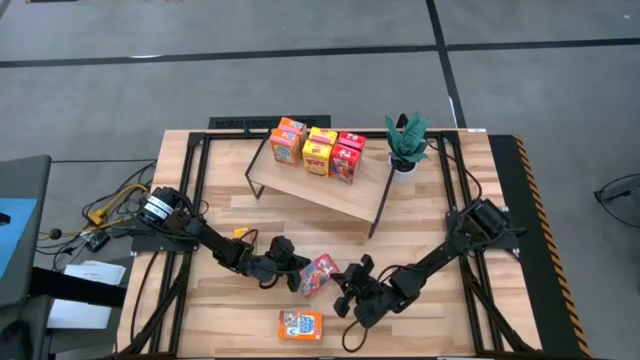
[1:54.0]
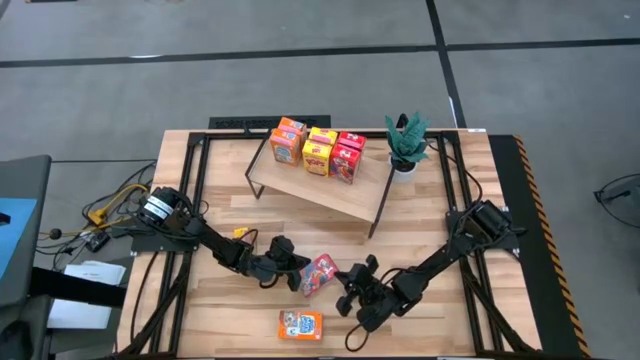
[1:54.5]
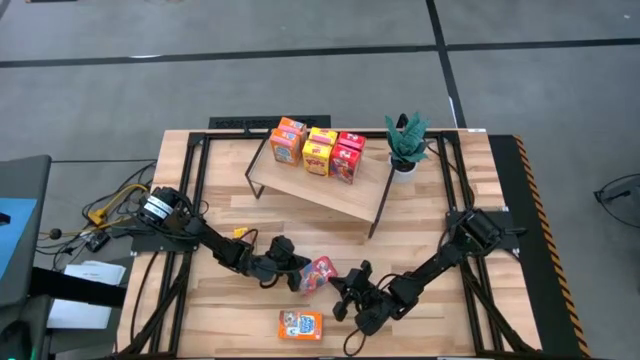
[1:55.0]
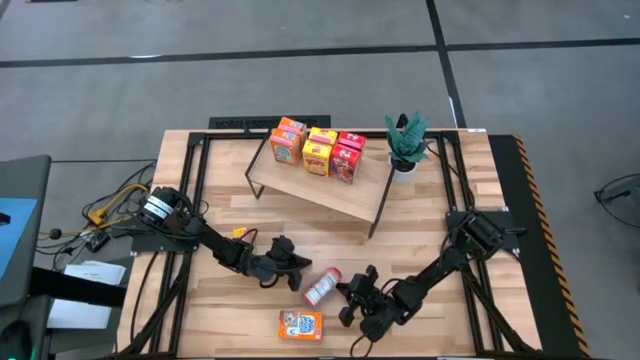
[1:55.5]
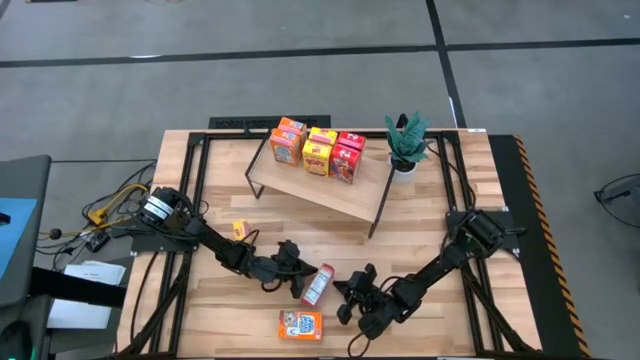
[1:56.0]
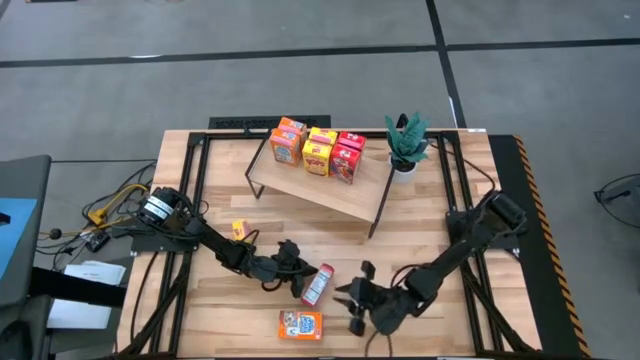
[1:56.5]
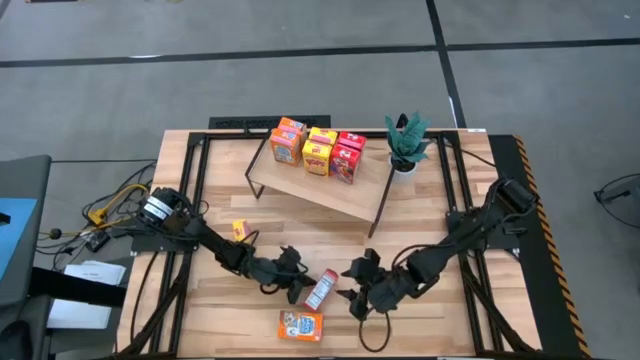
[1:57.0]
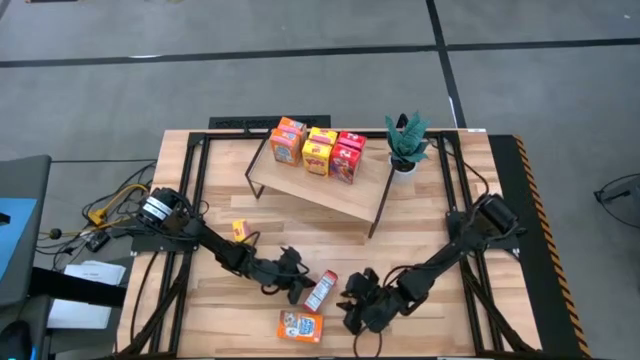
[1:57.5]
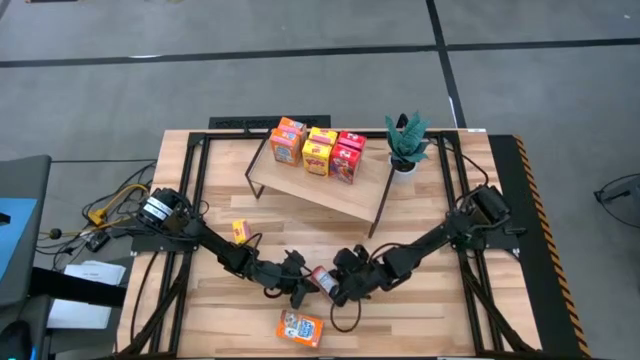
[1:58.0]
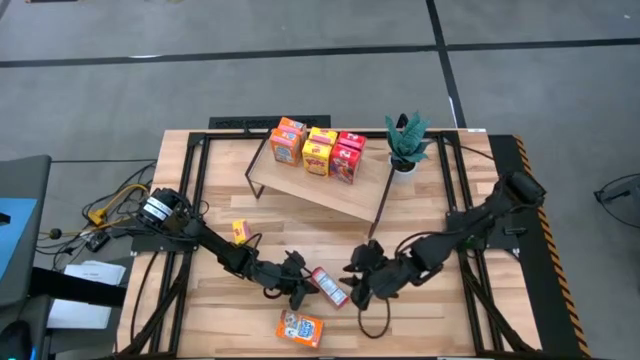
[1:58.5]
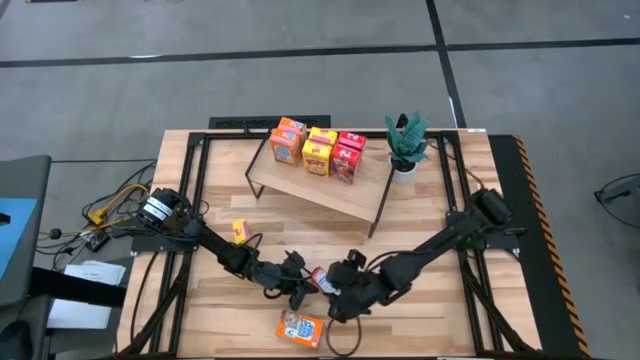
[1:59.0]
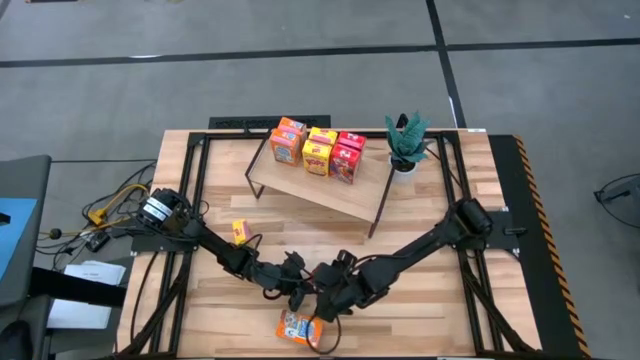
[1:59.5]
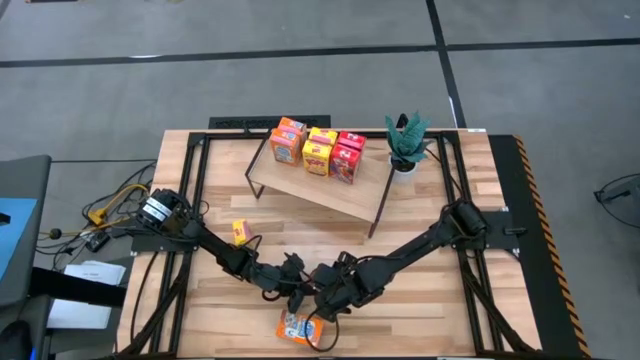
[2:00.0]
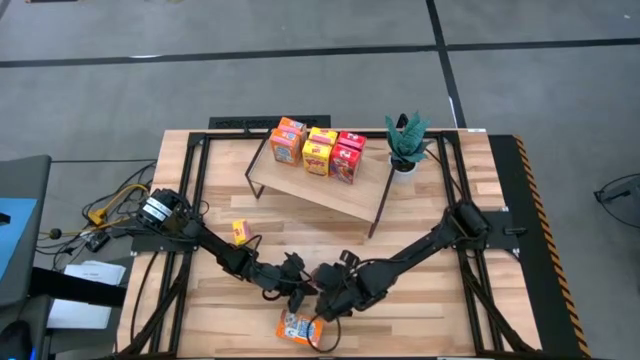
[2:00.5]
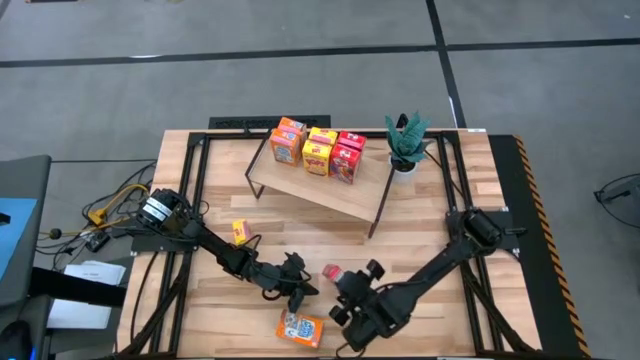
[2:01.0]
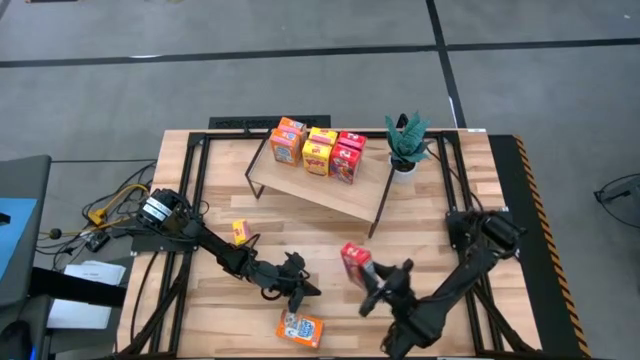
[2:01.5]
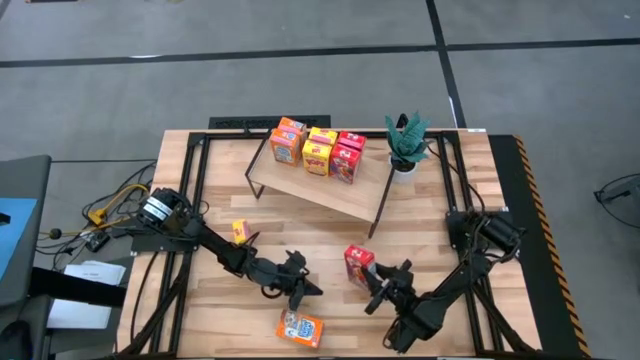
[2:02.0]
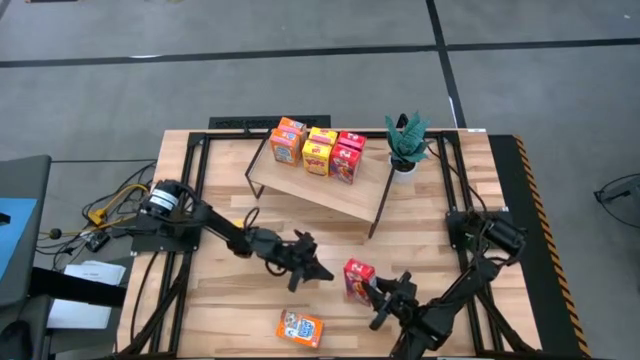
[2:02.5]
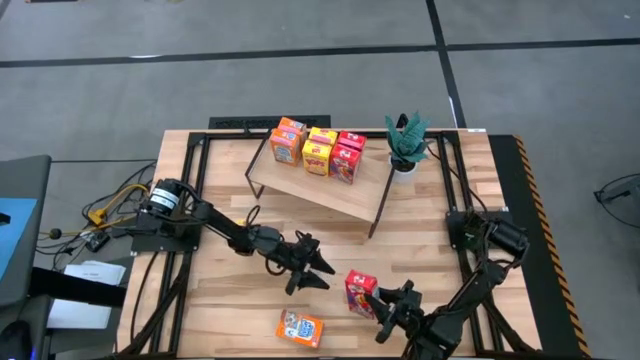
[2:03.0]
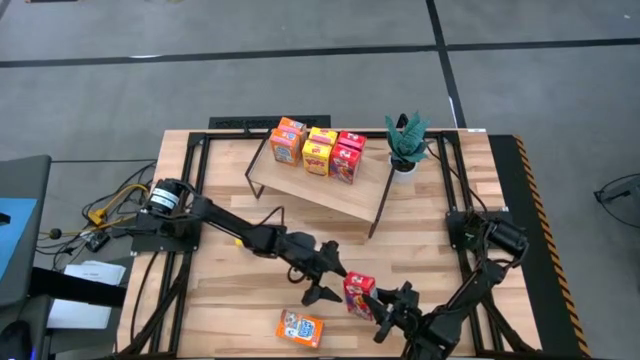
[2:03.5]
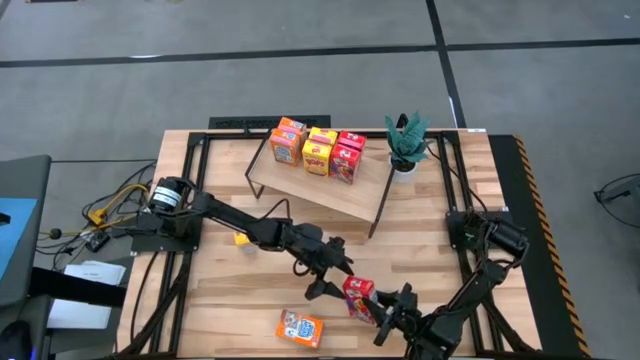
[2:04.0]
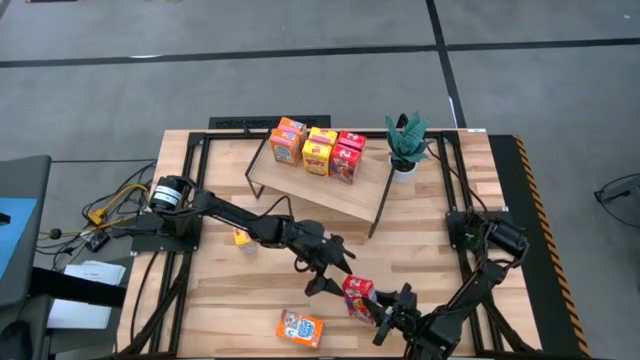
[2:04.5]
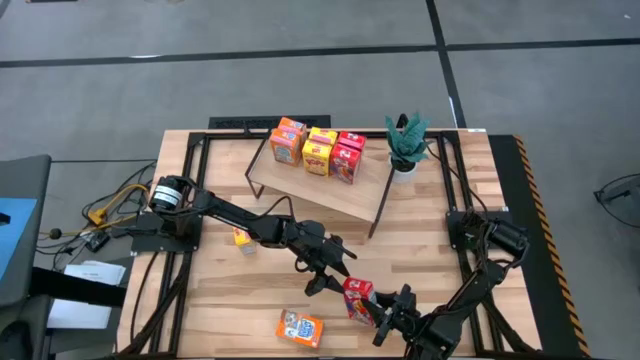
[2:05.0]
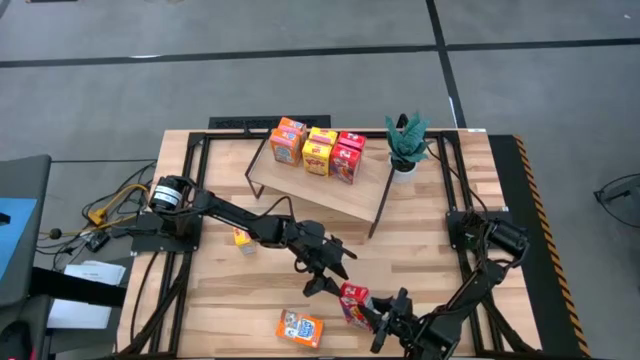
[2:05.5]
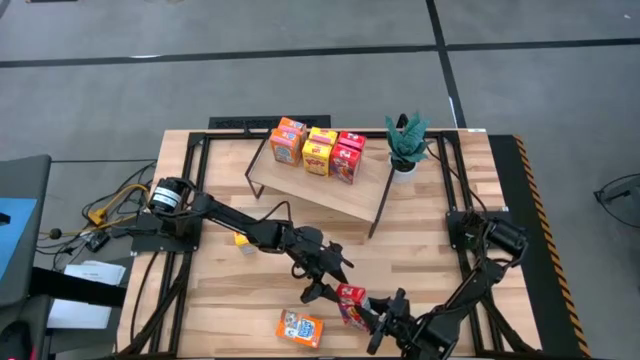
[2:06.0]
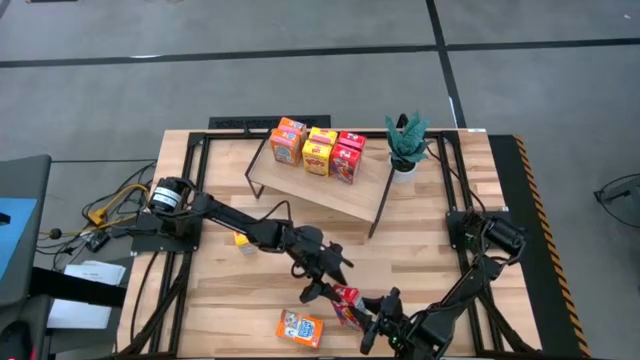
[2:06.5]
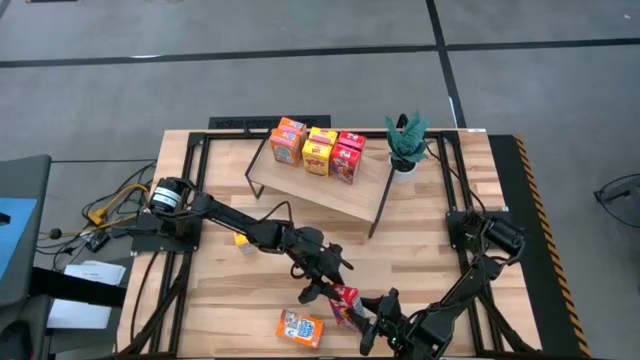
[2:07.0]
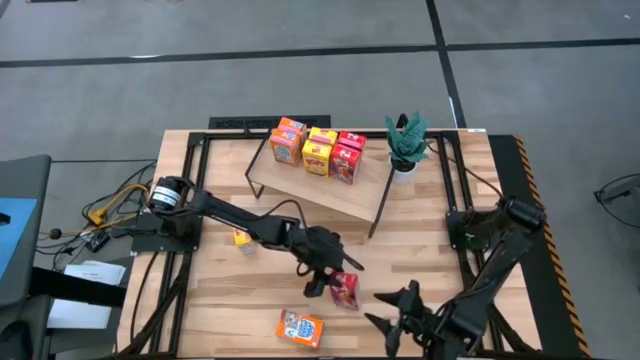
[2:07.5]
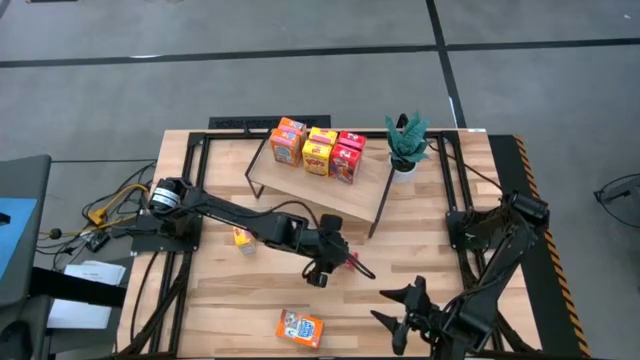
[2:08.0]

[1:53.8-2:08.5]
Task: Stack cereal on shelf
Put red cereal box on the table

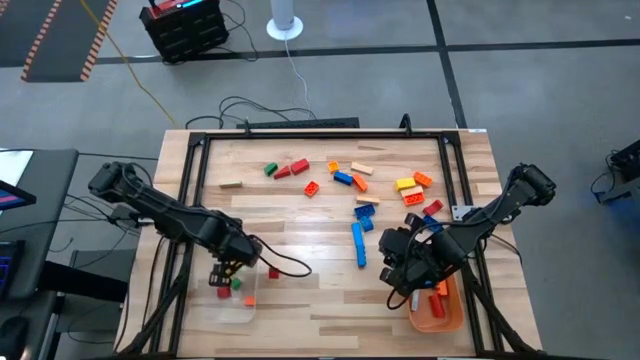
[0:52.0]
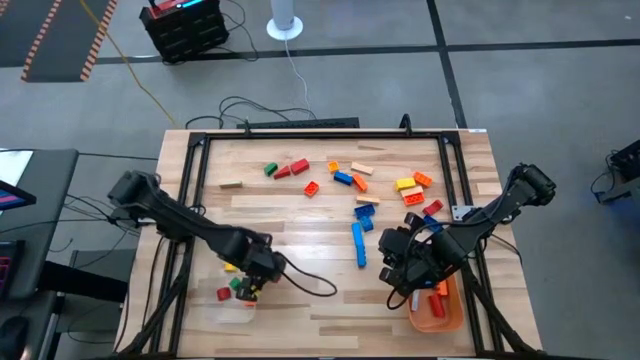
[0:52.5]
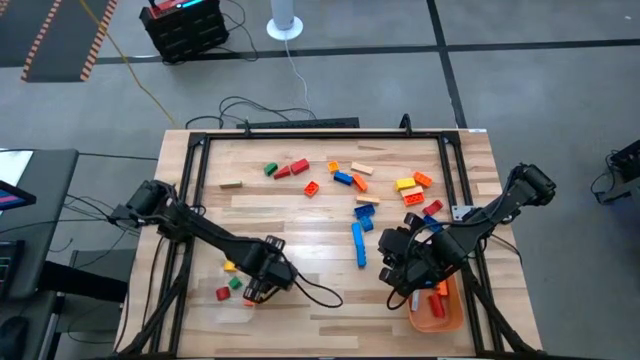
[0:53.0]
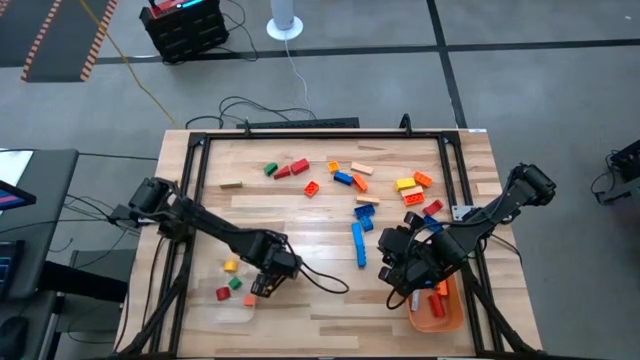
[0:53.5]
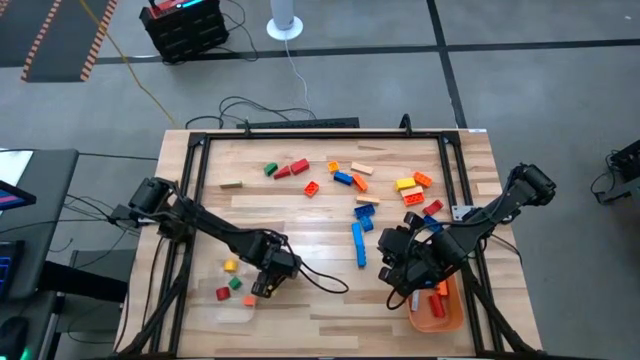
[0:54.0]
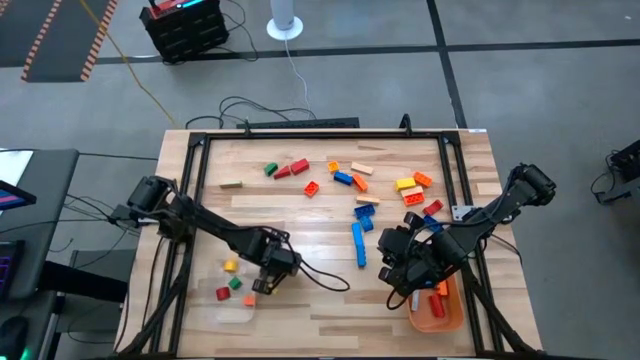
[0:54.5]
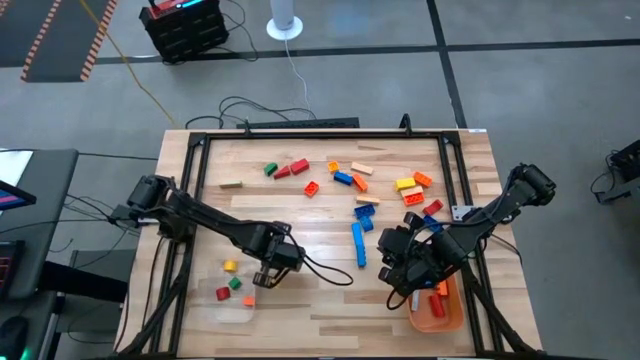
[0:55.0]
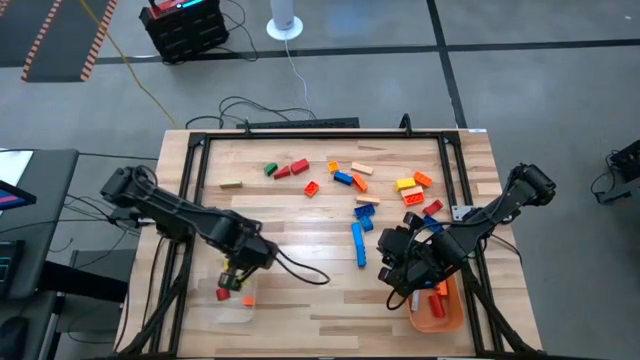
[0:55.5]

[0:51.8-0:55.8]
Task: Sort blocks by size
Put the small red block into the transparent bin

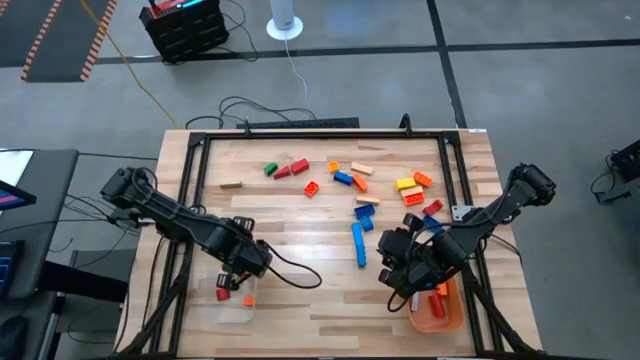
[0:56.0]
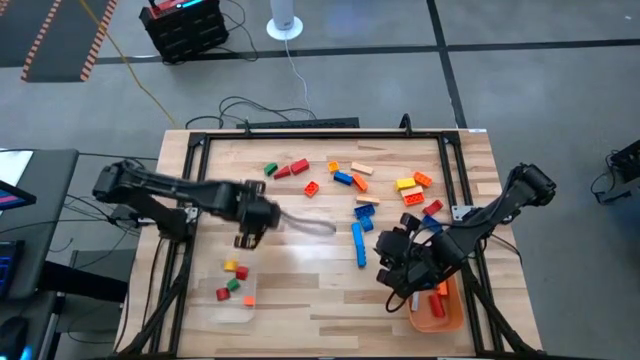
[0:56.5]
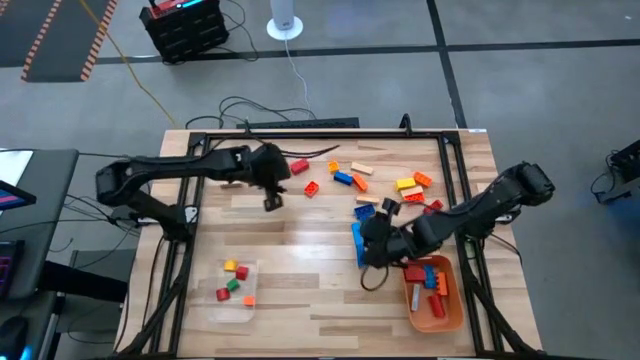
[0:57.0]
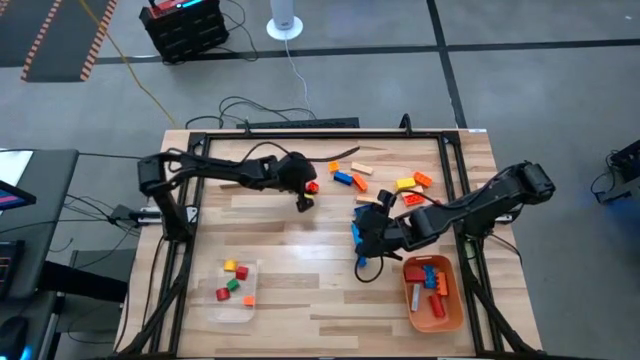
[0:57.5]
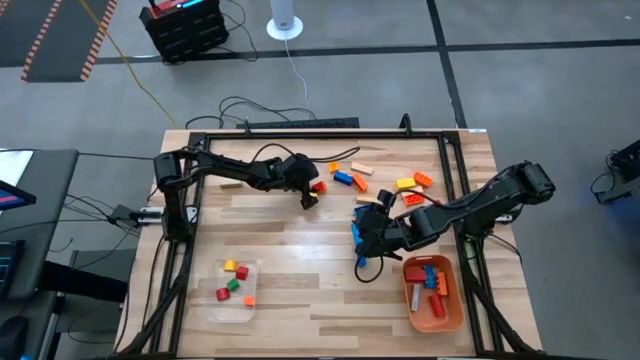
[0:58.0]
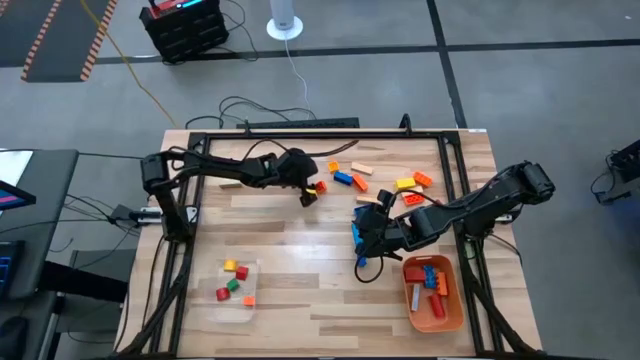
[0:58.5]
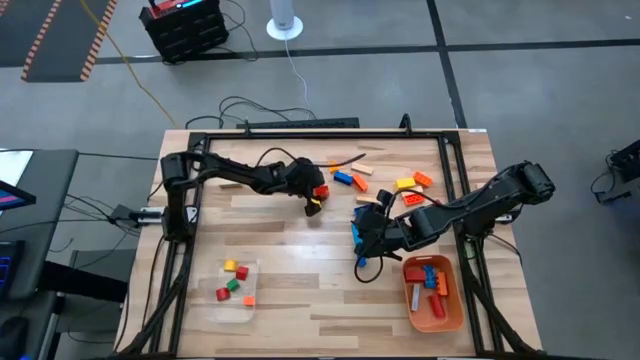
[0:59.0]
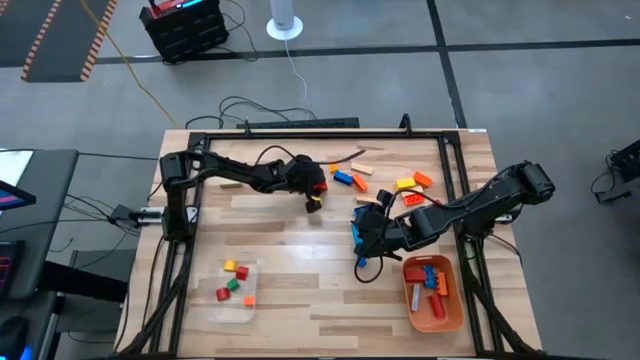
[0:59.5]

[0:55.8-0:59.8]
Put the small orange game piece into the transparent bin
